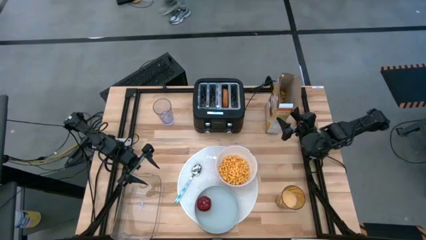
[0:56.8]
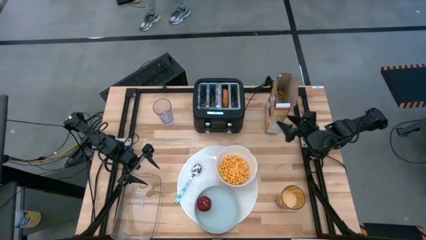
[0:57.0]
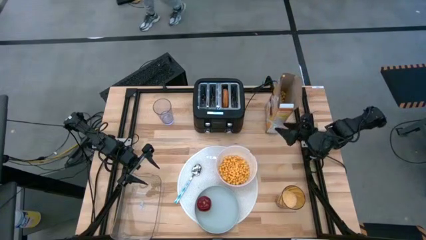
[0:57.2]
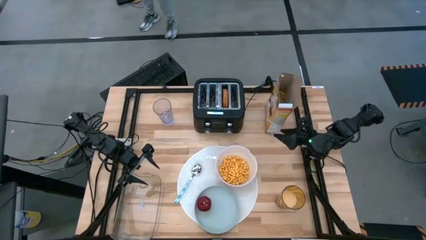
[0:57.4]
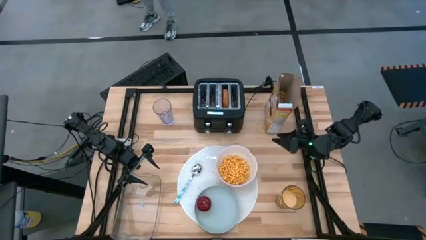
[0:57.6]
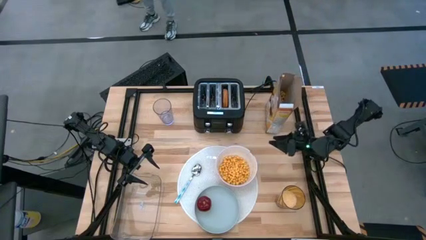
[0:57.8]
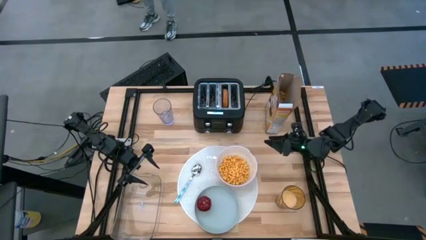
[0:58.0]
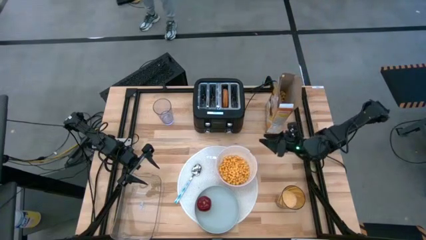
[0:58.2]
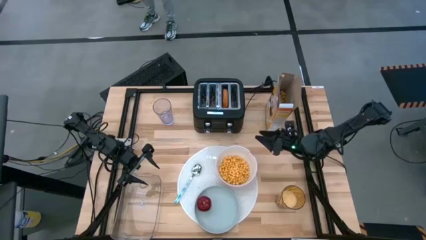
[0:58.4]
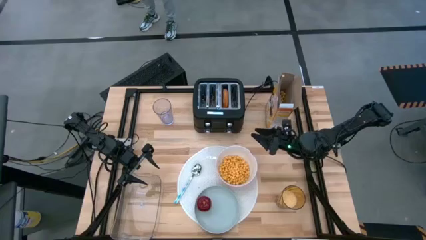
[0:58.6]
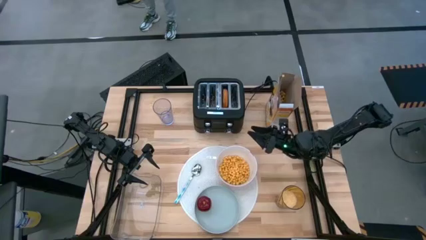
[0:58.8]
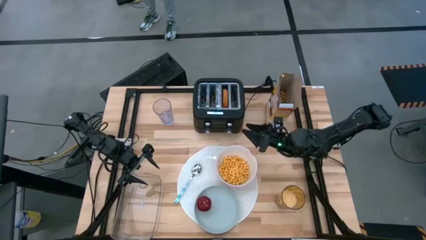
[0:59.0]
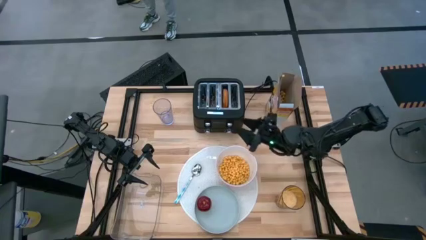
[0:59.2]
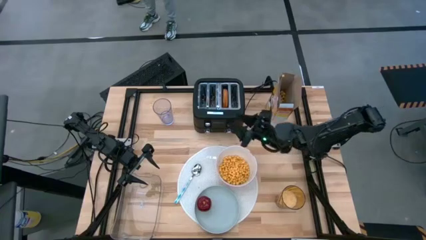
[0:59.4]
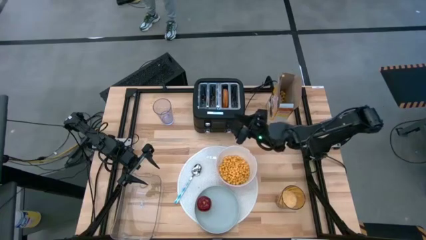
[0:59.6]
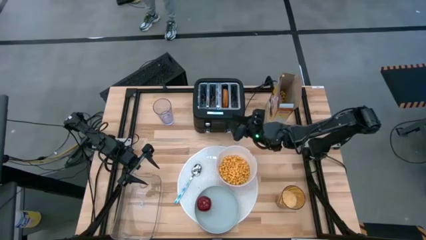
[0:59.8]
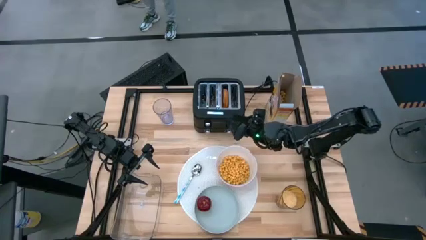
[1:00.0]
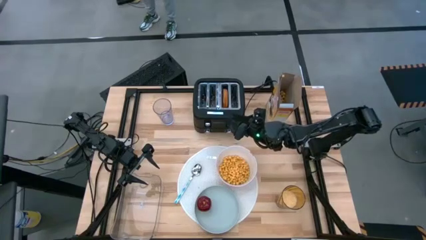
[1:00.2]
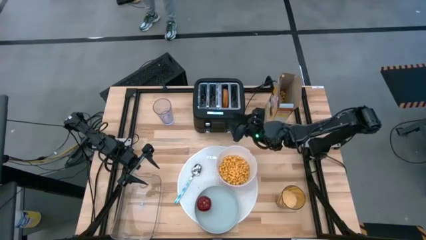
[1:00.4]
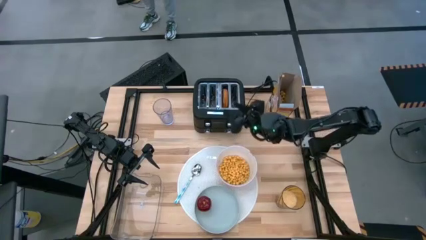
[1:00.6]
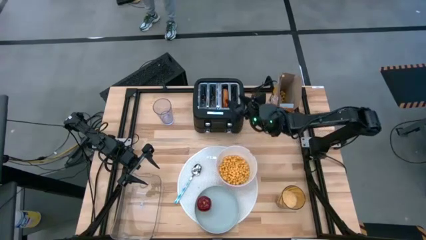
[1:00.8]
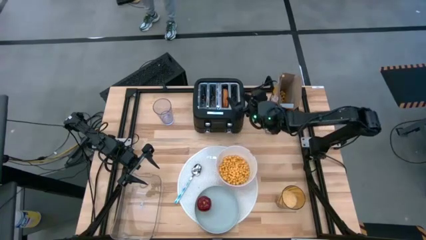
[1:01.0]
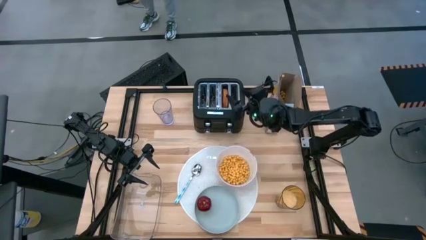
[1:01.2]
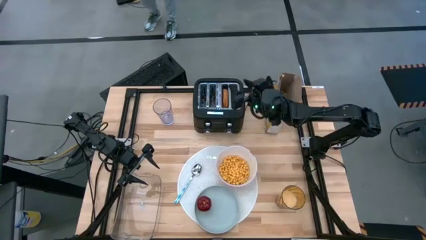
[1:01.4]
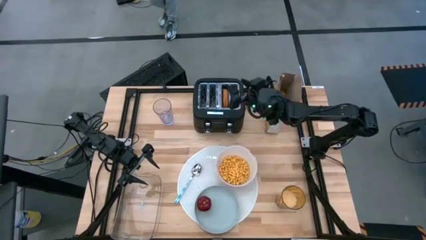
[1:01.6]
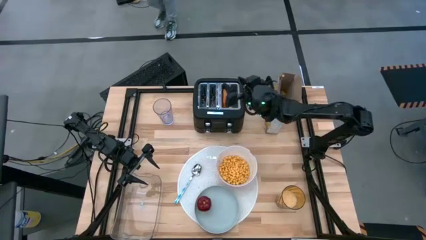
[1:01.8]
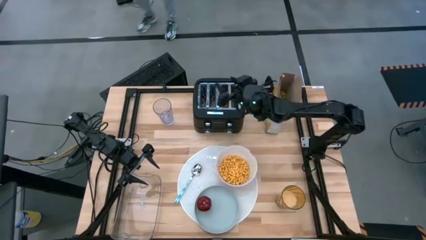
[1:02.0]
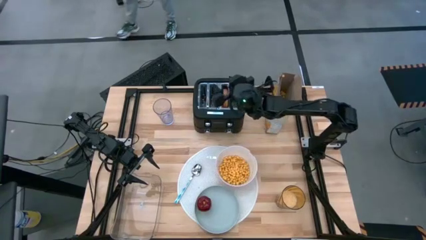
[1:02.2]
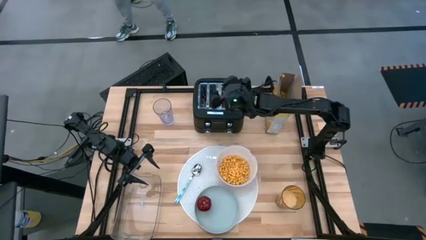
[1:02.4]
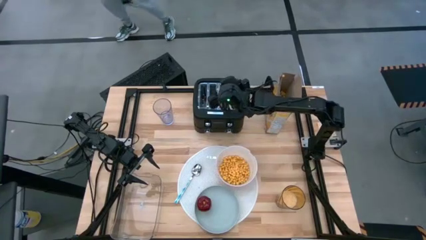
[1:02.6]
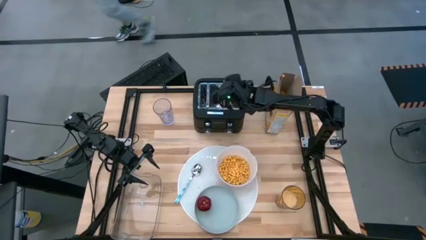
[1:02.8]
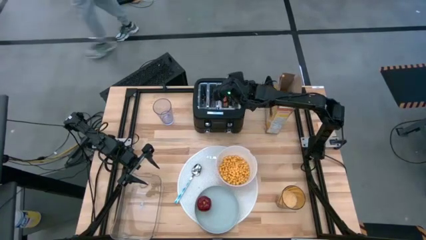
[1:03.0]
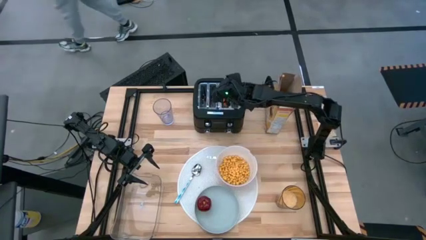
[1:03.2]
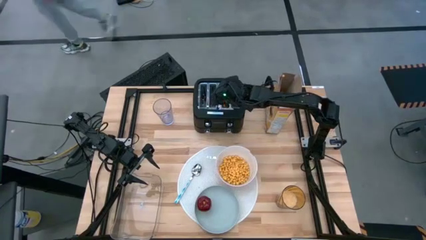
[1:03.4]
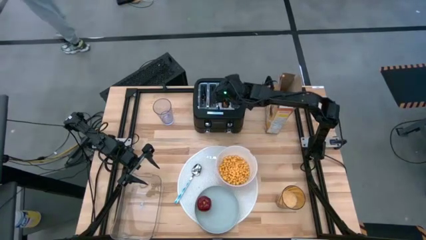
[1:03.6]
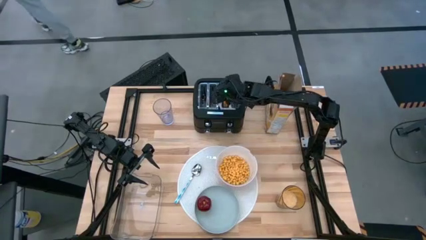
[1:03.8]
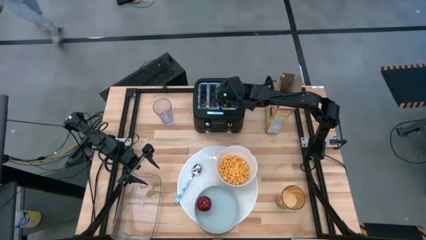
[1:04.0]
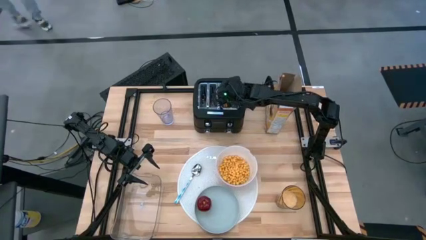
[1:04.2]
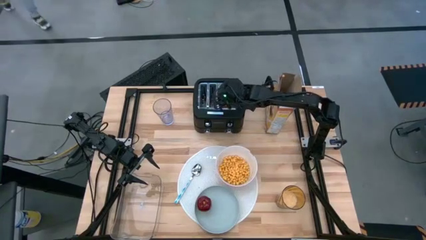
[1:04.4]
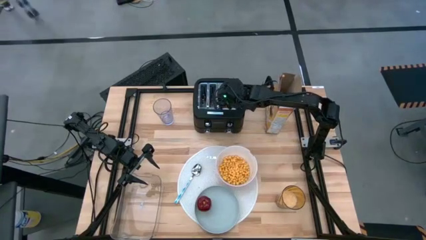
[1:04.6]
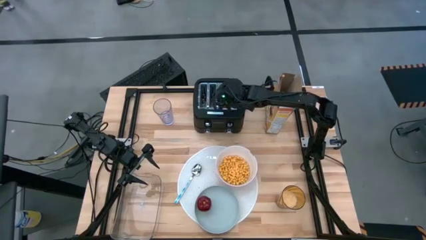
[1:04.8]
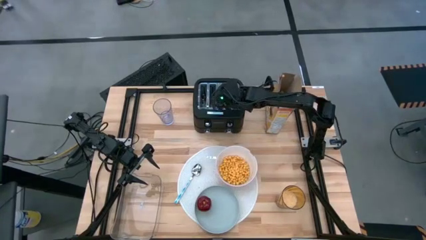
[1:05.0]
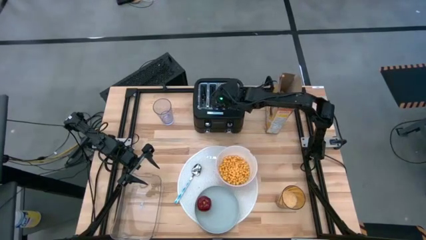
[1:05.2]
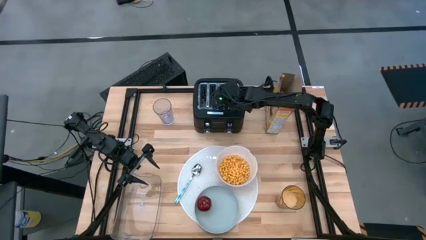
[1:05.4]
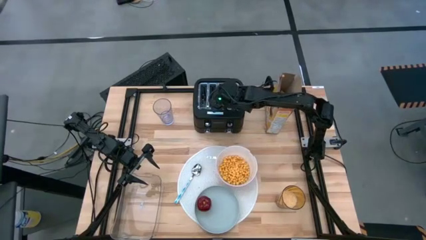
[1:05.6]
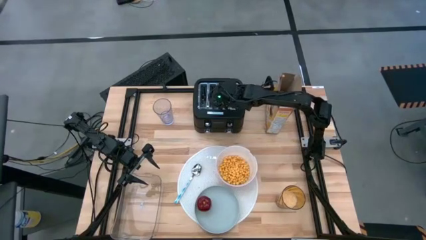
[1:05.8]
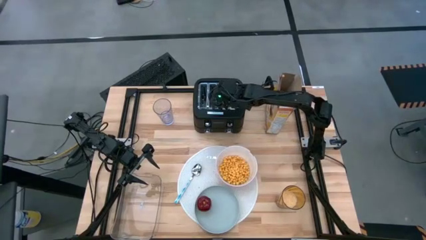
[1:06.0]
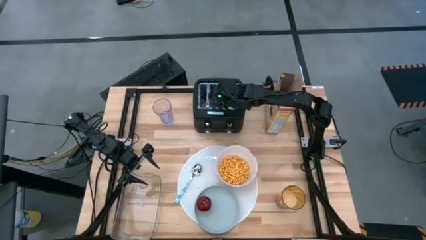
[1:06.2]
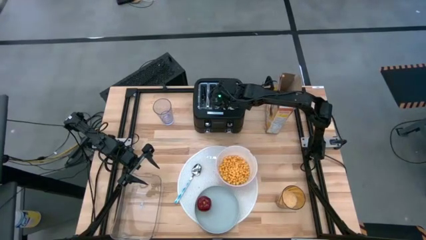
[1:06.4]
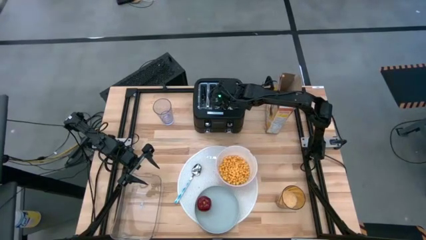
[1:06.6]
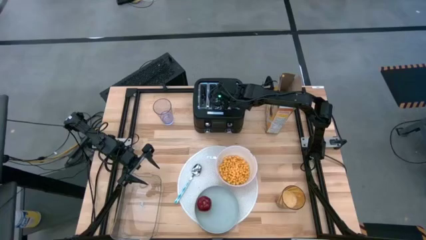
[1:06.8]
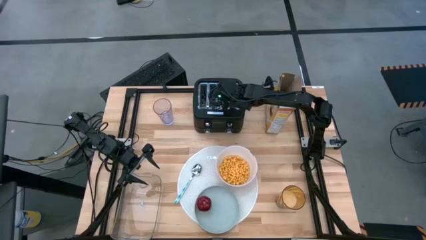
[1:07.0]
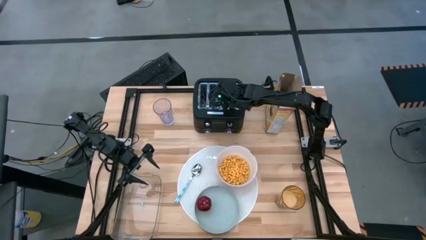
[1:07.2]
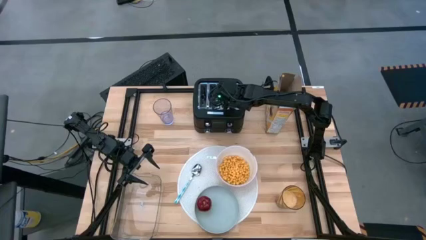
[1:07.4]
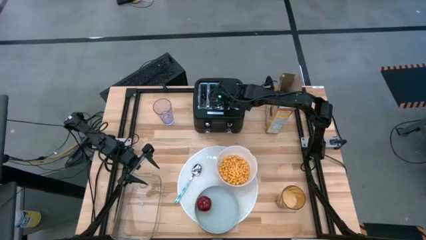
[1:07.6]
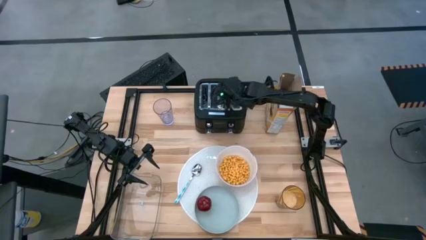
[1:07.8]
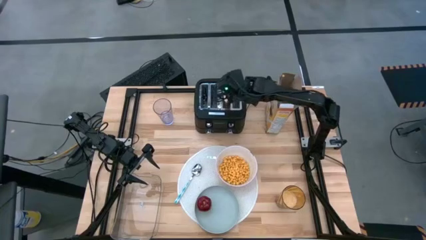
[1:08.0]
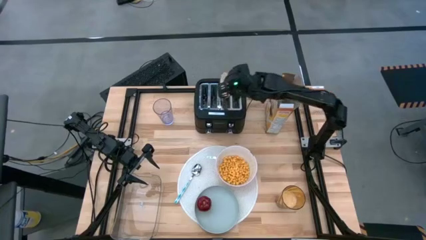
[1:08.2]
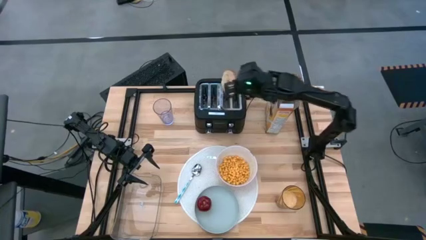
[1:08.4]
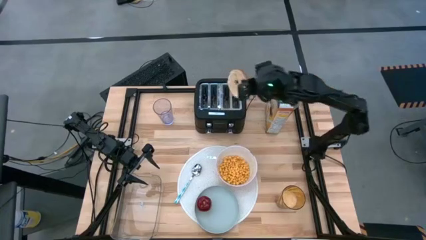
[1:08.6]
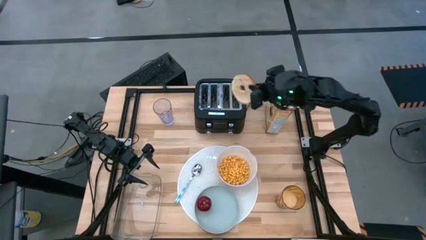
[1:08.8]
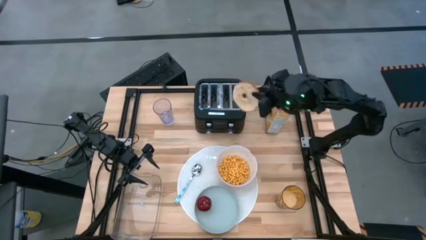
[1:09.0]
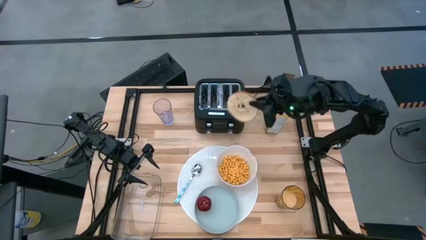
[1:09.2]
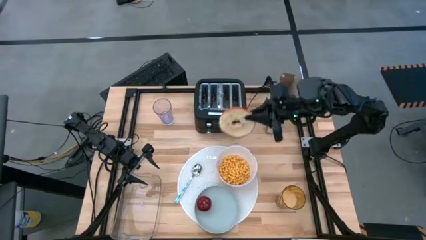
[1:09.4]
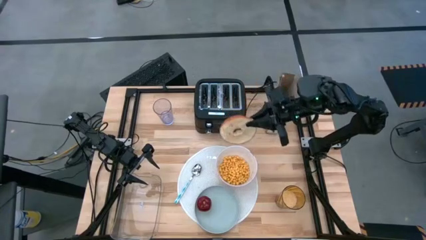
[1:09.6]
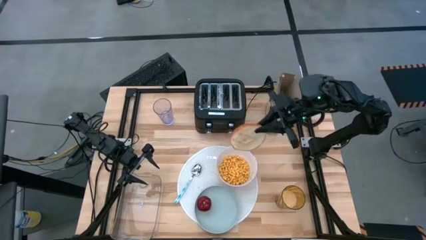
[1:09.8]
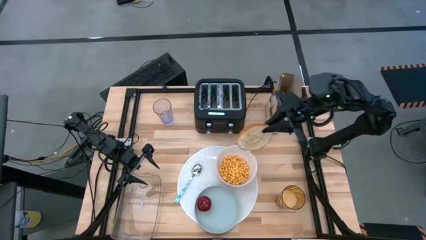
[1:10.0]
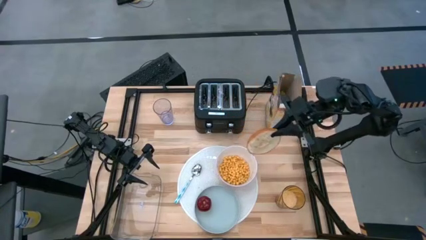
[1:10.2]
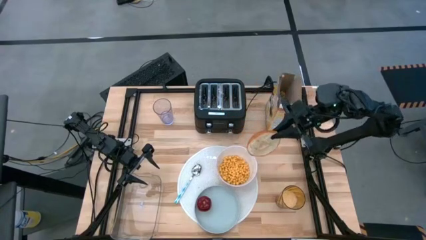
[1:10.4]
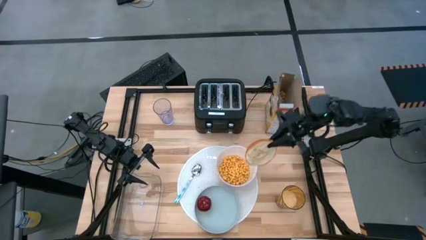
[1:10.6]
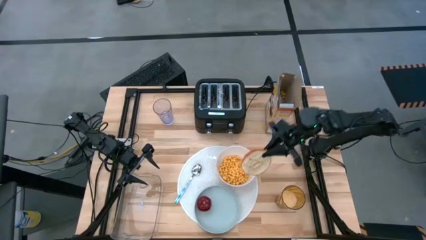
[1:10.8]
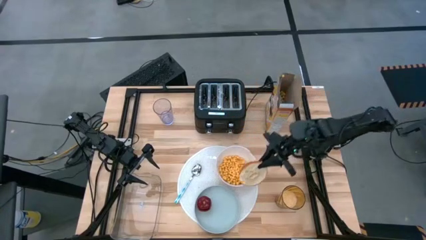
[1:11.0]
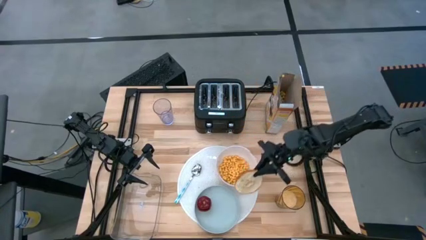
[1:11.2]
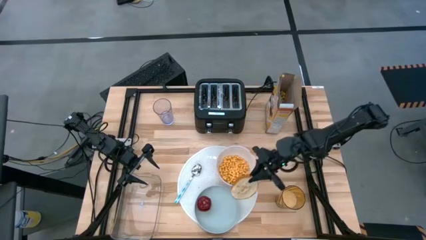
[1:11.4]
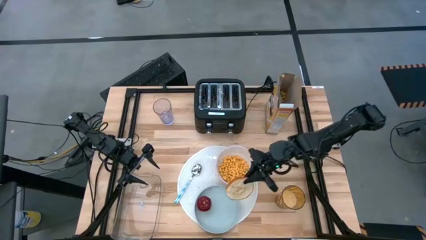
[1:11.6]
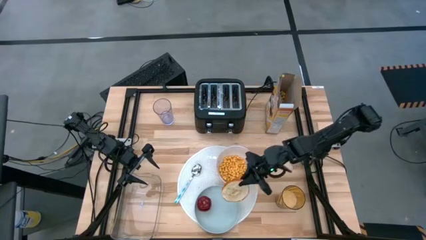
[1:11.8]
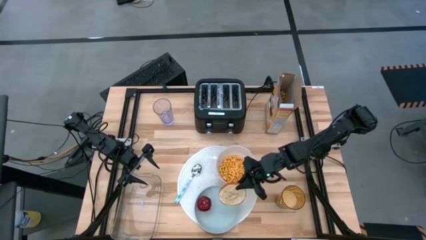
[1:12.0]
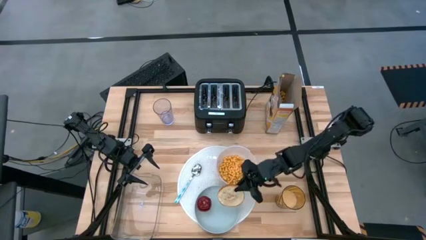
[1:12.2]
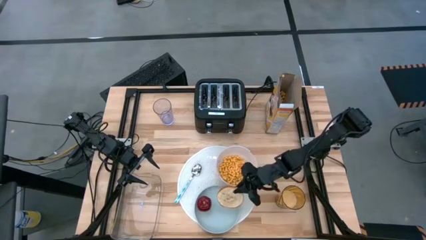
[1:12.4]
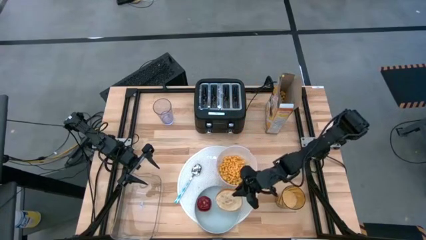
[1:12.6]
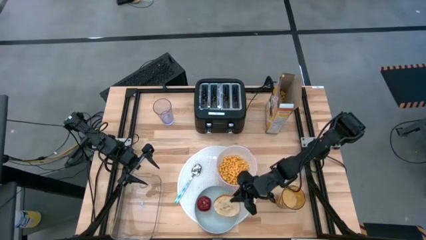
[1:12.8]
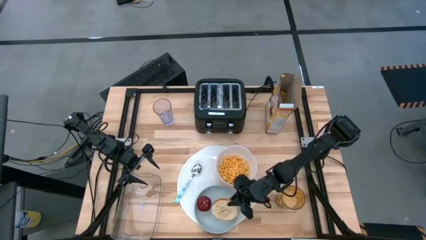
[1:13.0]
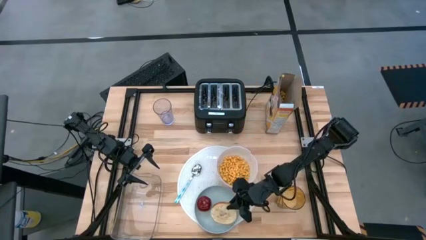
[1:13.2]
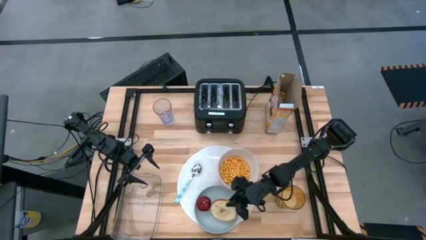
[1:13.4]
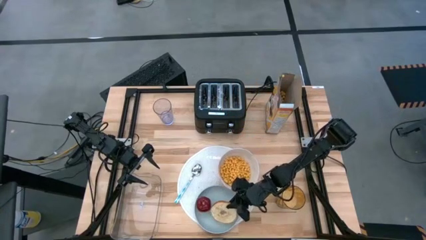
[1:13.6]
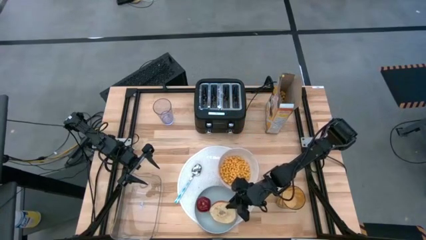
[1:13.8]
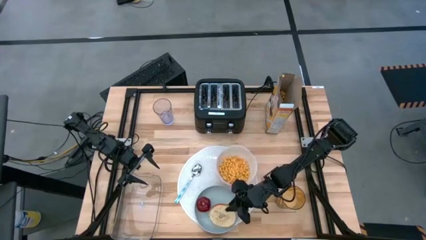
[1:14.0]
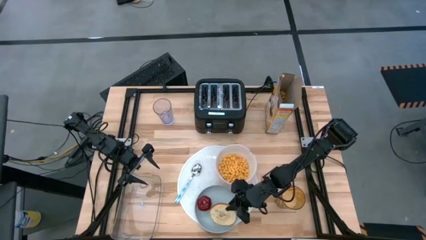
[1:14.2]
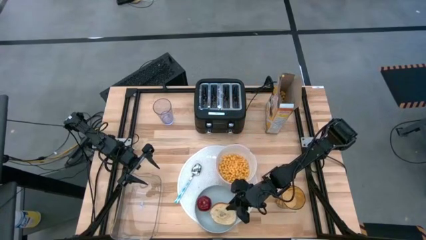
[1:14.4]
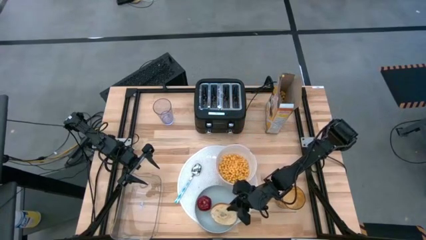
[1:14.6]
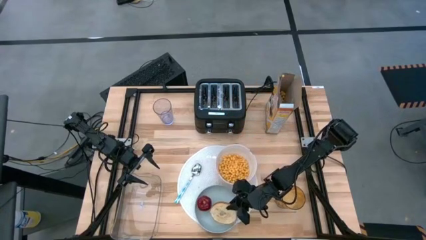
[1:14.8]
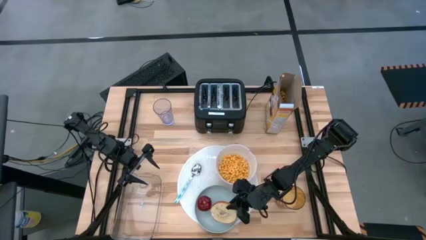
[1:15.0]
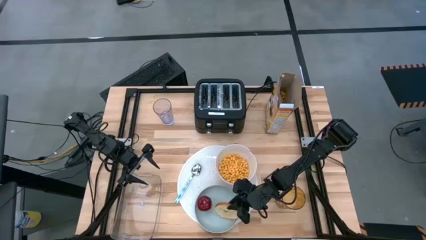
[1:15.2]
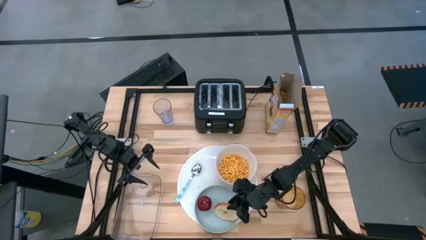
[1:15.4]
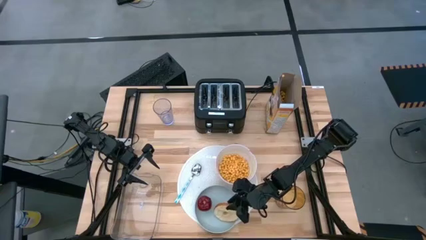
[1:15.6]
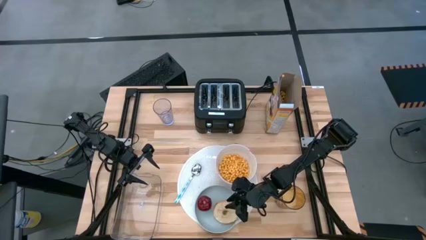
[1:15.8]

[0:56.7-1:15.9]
Task: Arrange a breakfast setting
Put the brown bread to the right of the apple on the gray plate
